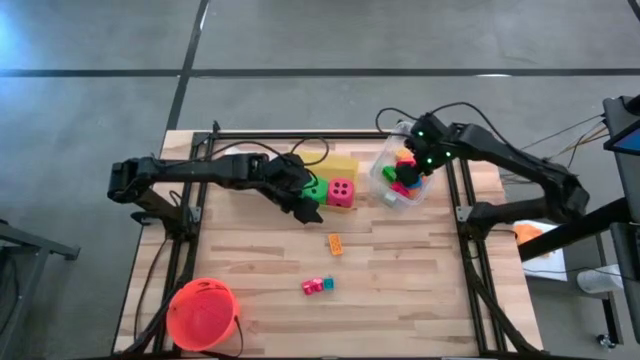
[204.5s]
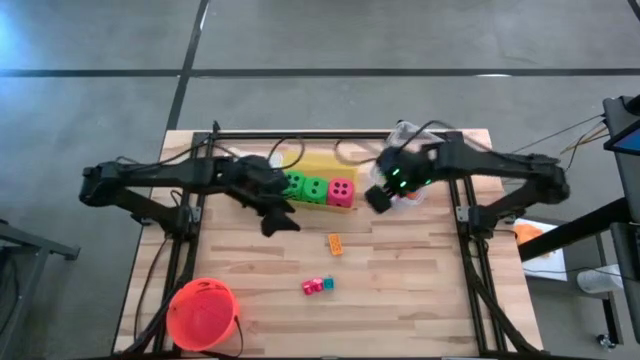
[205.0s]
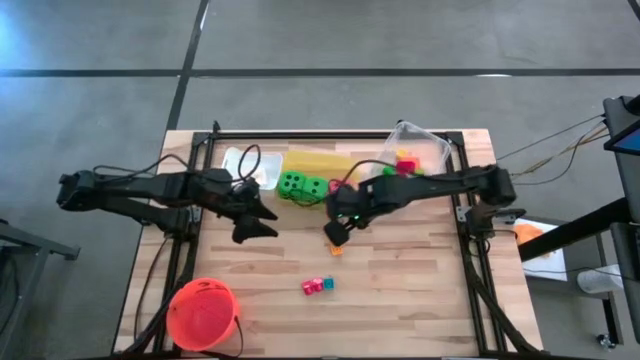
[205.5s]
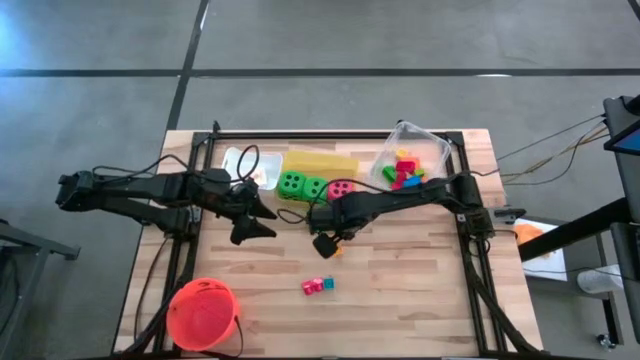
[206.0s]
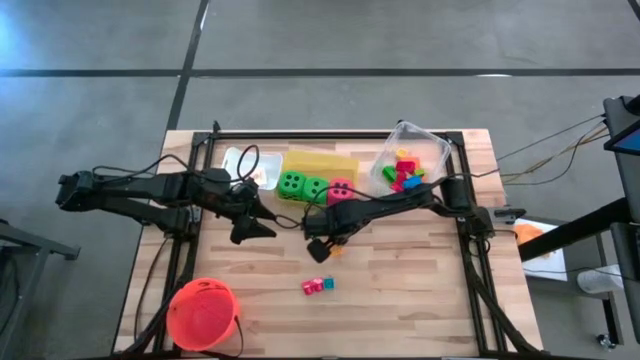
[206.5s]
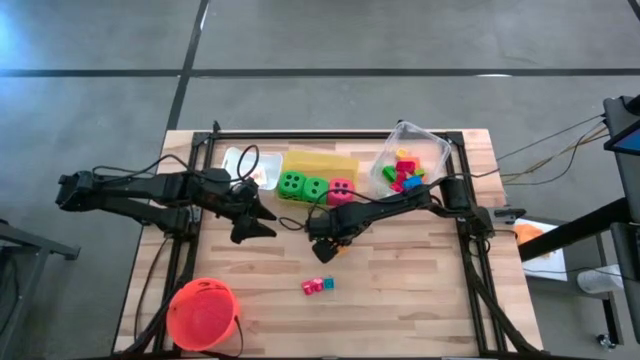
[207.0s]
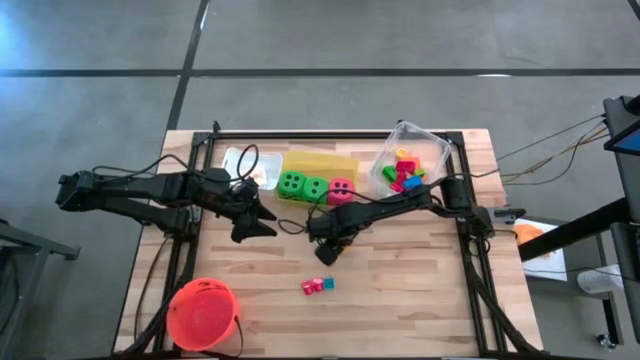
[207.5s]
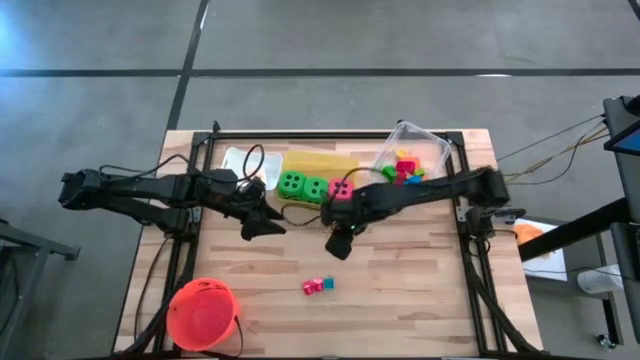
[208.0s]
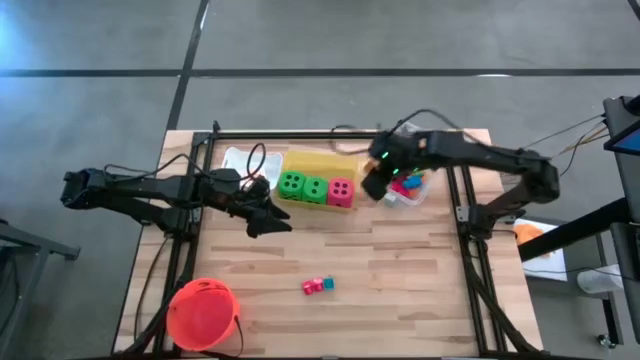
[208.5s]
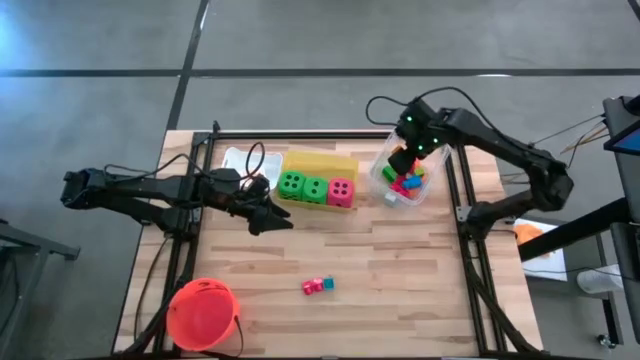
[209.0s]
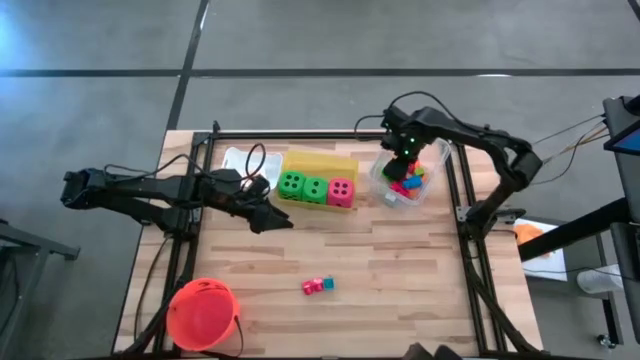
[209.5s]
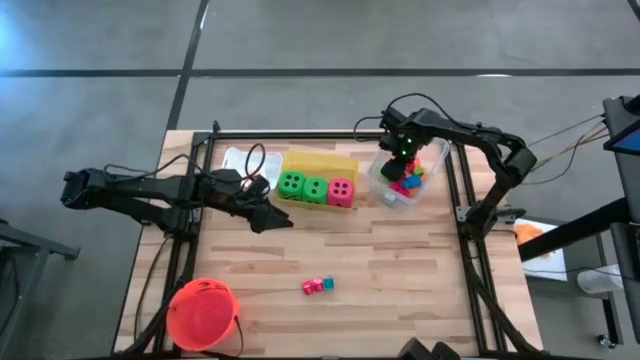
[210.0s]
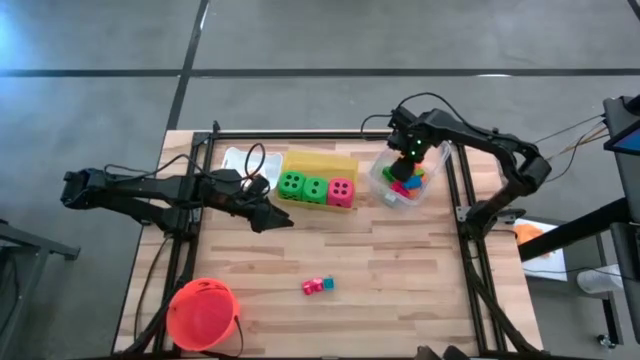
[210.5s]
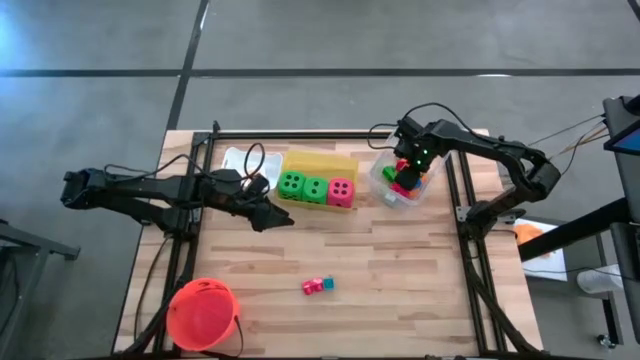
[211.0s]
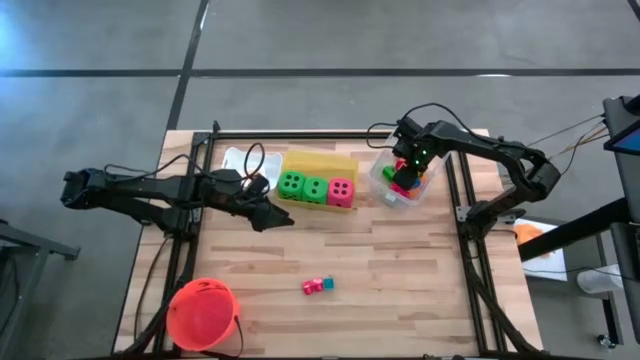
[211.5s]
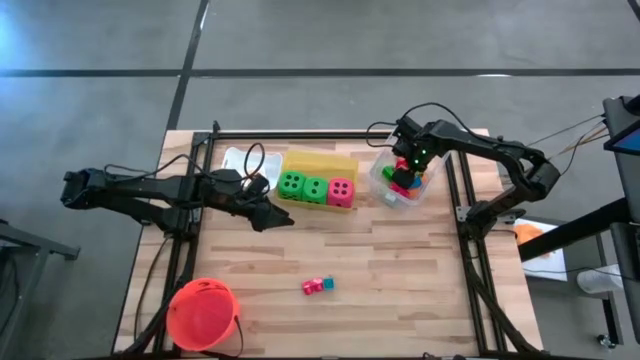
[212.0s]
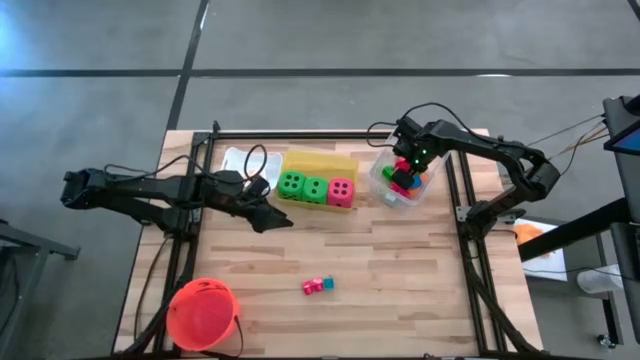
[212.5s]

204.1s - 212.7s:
Task: Pick & Place Toys
Put the yellow game piece into the transparent bin

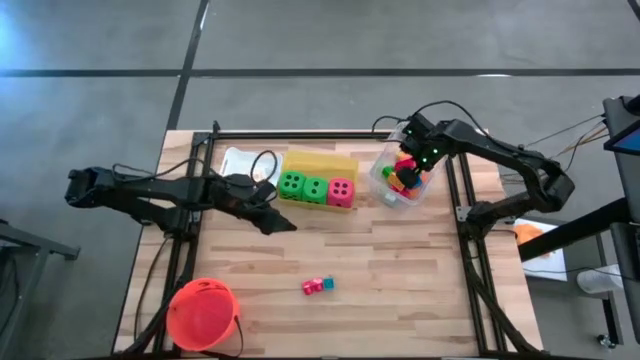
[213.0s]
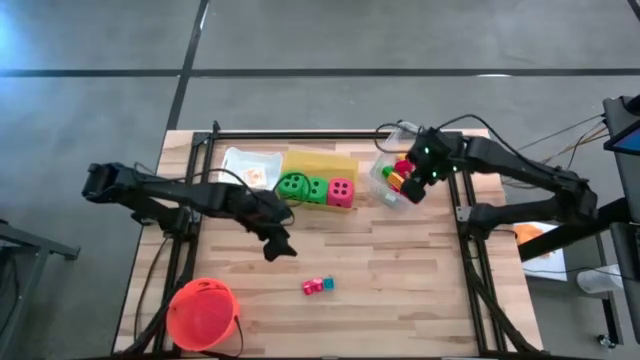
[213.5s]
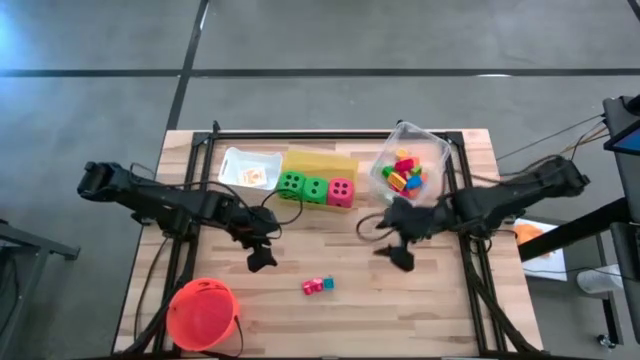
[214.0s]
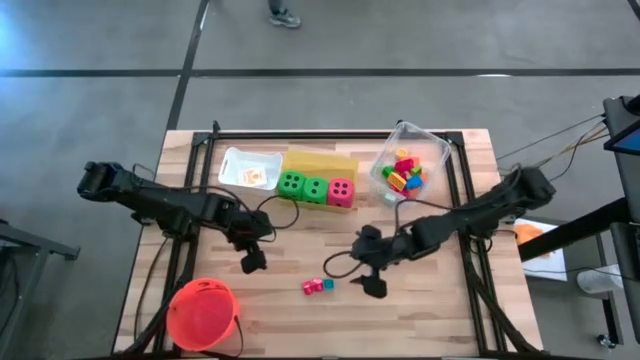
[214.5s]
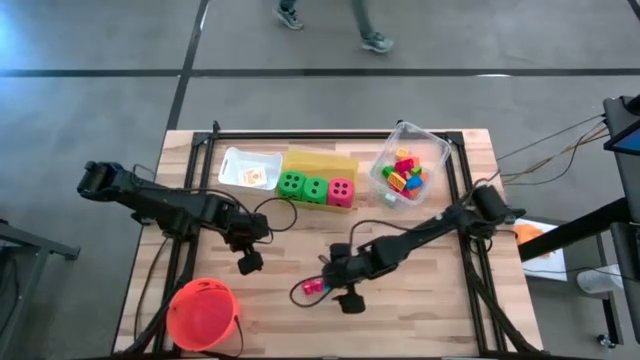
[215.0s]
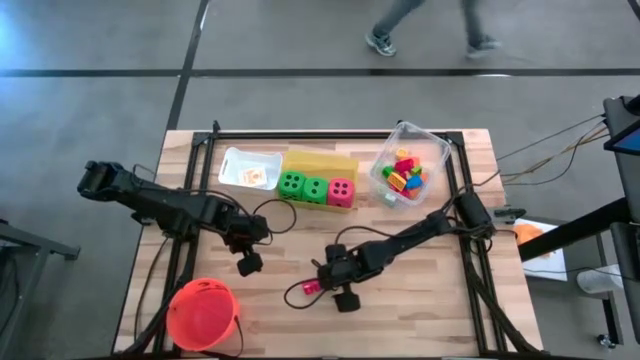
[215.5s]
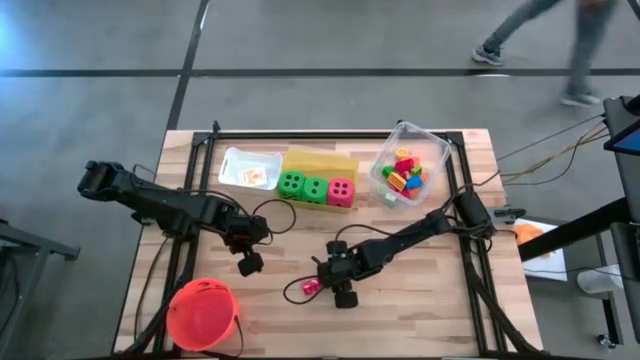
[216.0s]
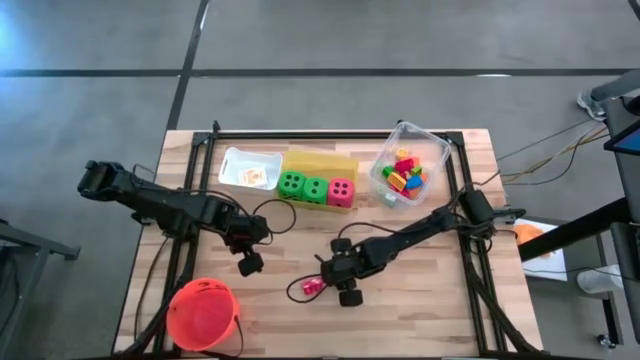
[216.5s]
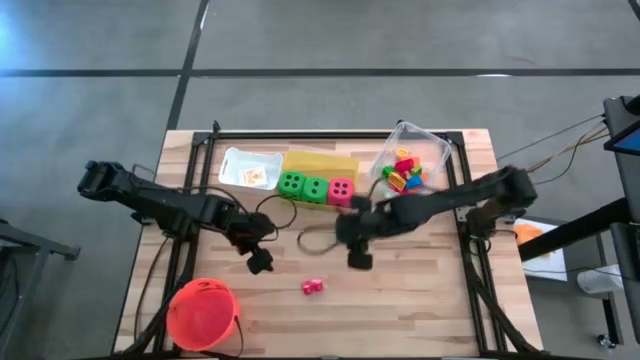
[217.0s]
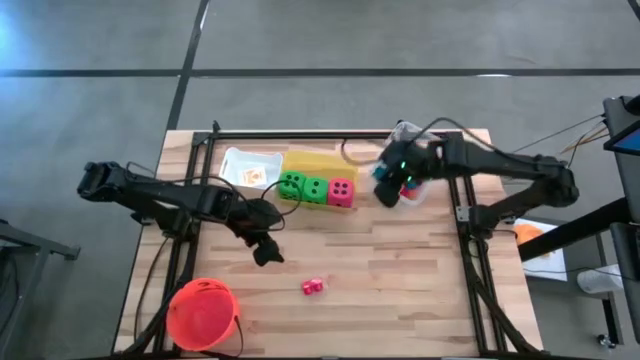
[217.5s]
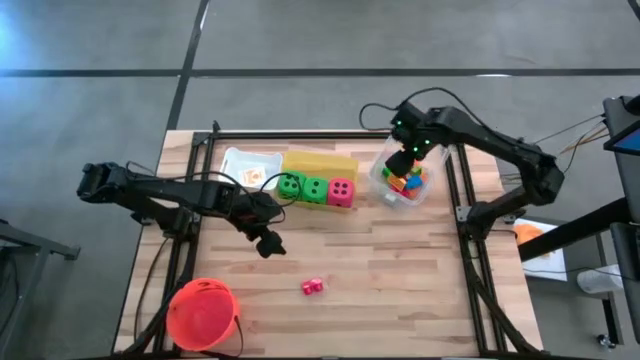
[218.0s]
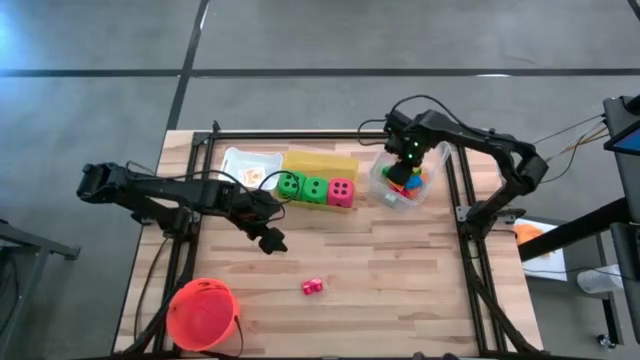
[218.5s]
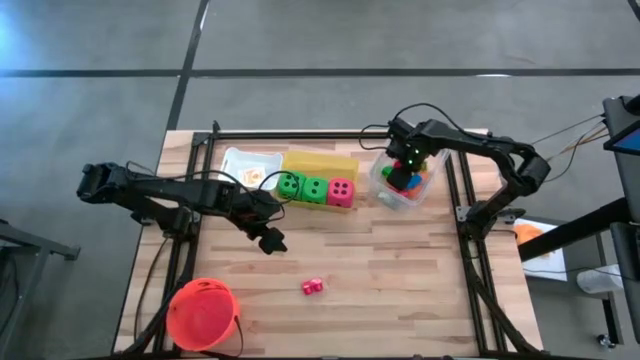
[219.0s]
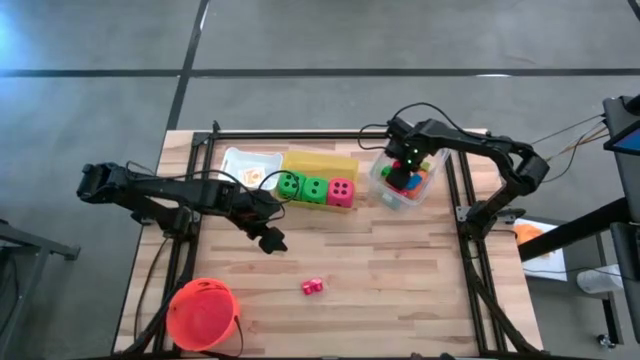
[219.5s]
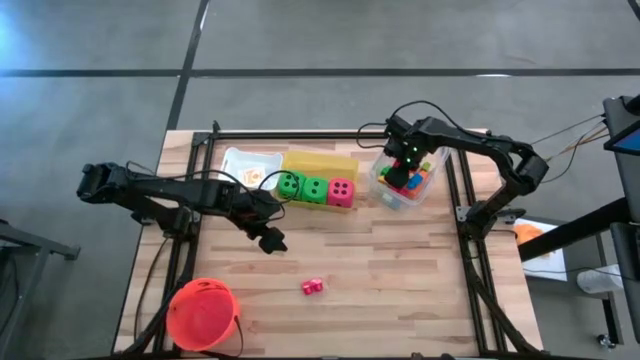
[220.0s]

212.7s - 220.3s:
Put the blue game piece into the transparent bin

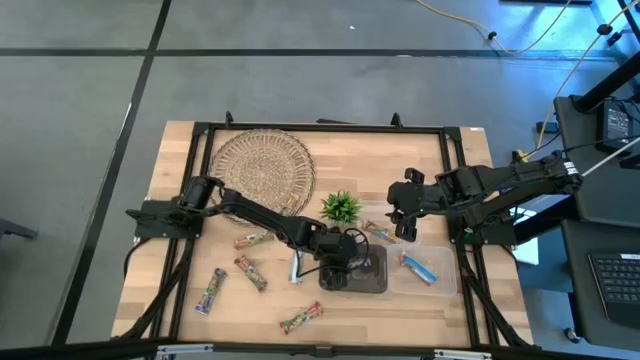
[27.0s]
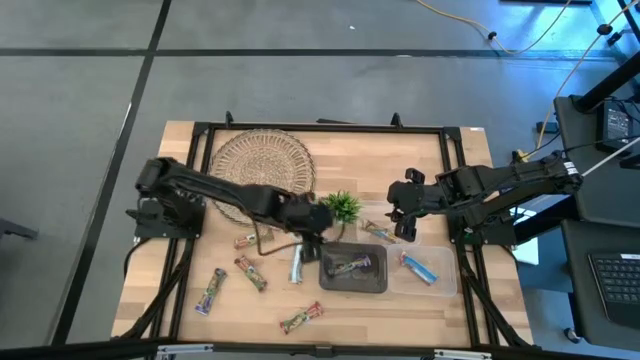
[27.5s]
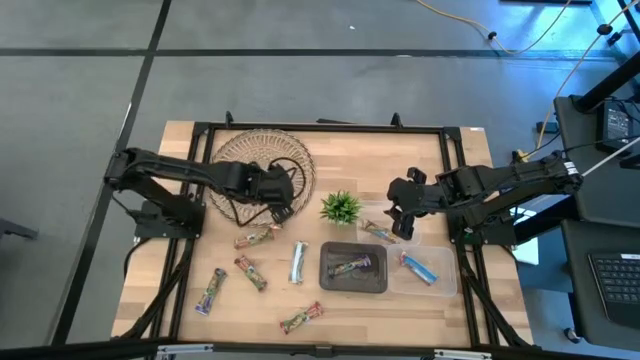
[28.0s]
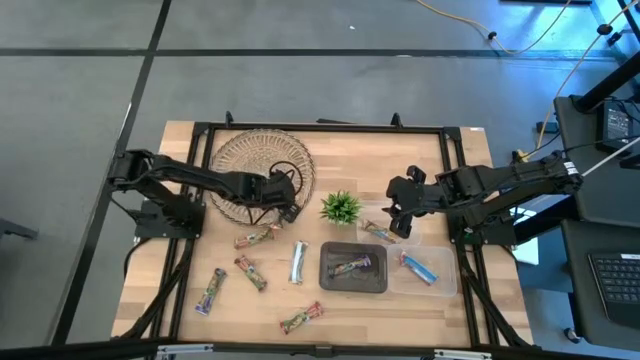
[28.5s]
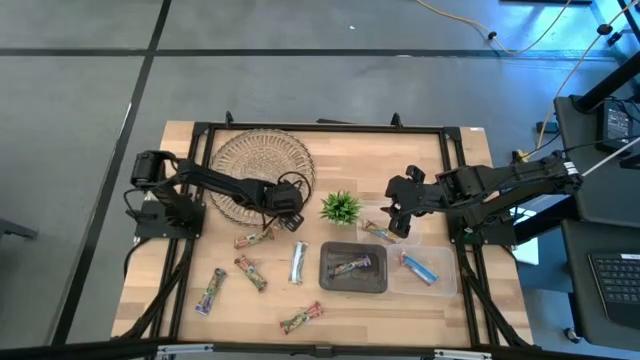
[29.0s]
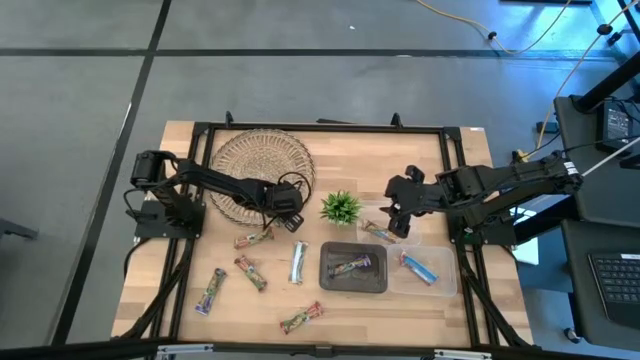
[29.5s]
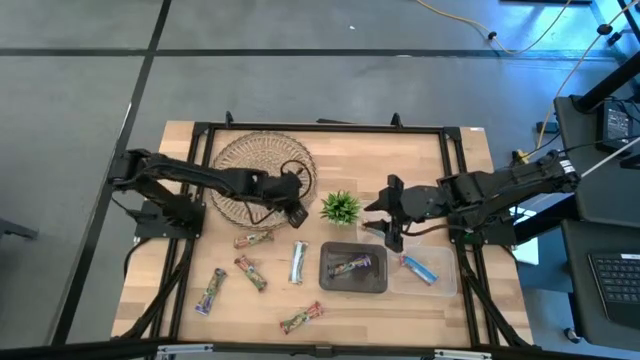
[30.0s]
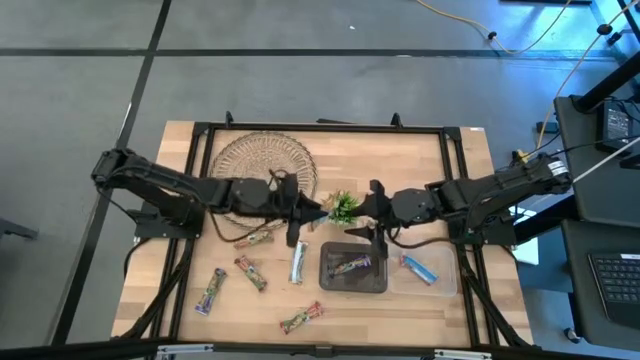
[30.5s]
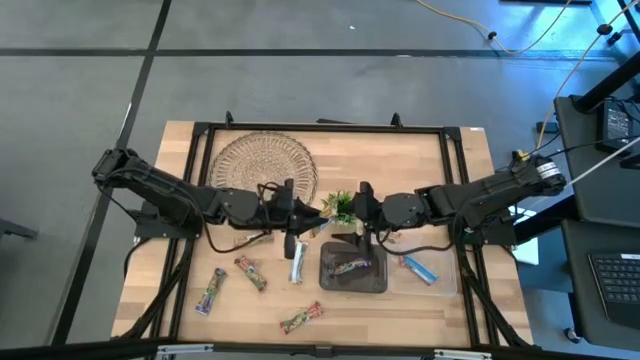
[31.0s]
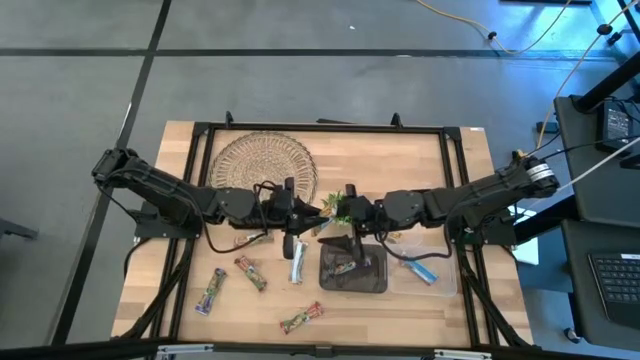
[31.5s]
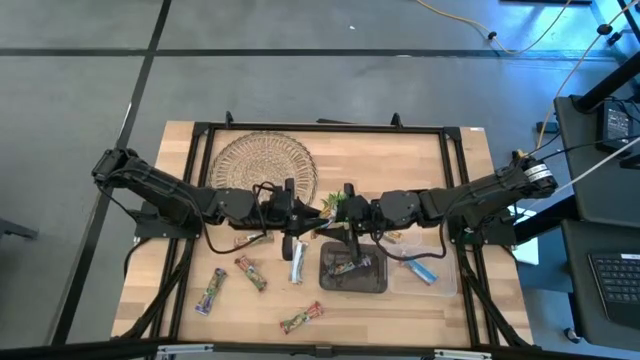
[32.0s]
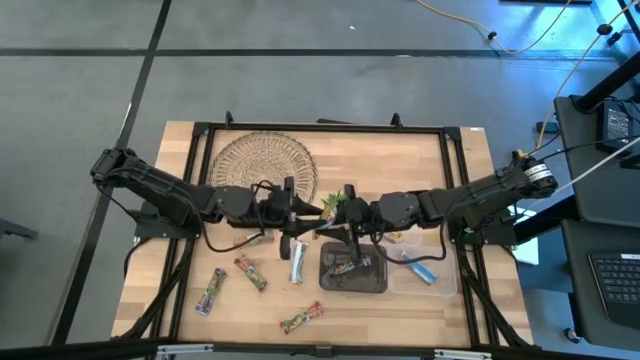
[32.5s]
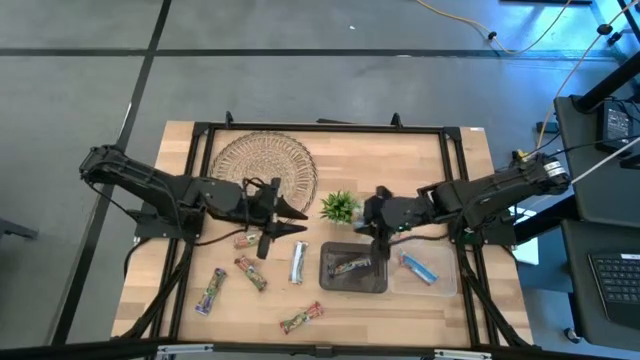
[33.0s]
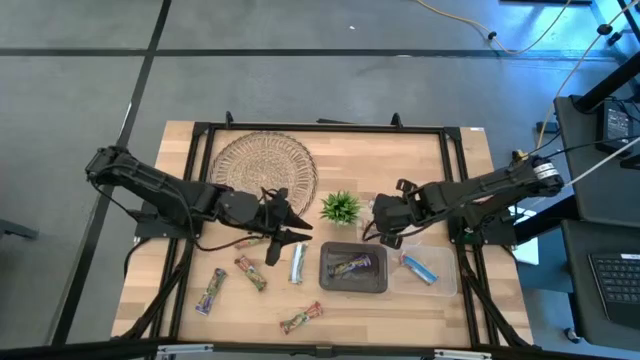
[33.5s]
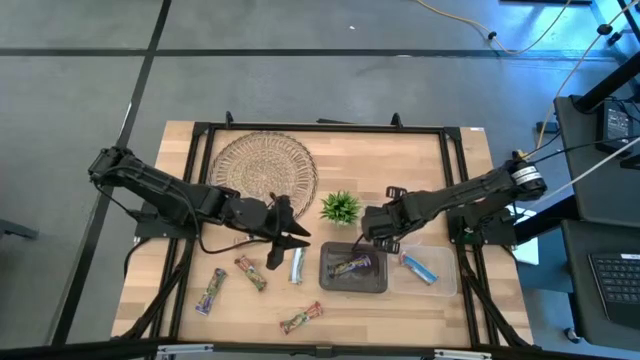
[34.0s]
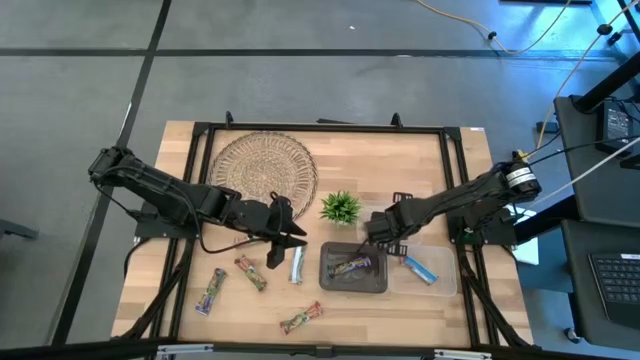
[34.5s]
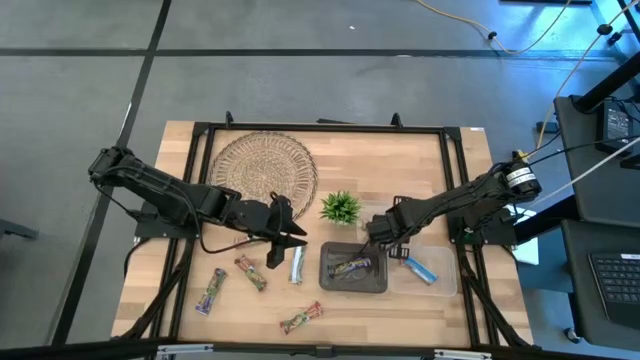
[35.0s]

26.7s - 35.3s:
Task: Pick and place Granola Bars by type
Put the orange granola bar into the top transparent bin
